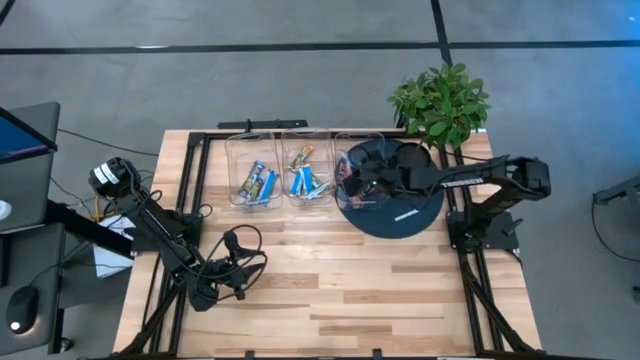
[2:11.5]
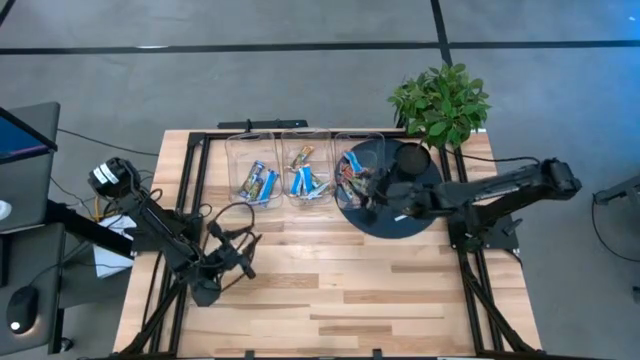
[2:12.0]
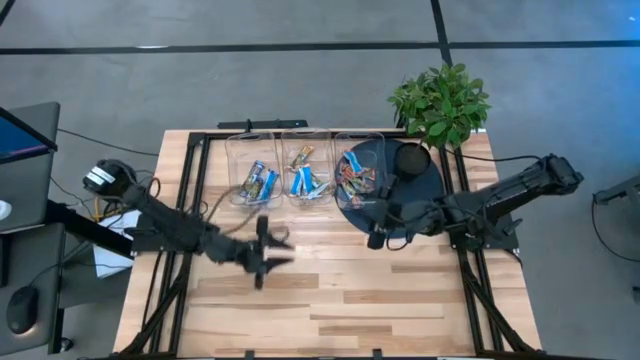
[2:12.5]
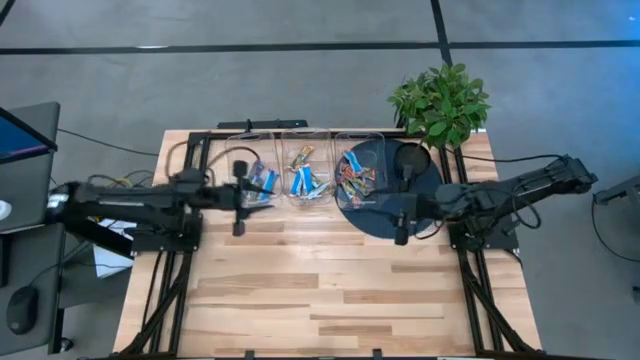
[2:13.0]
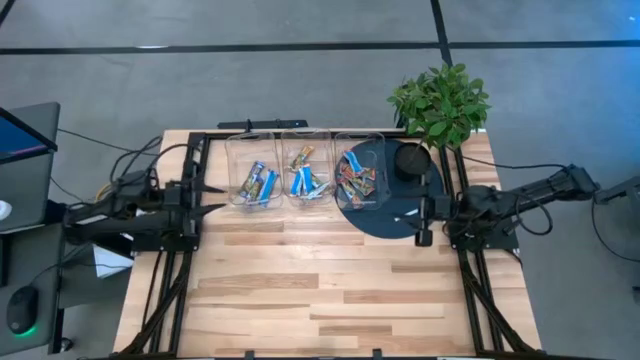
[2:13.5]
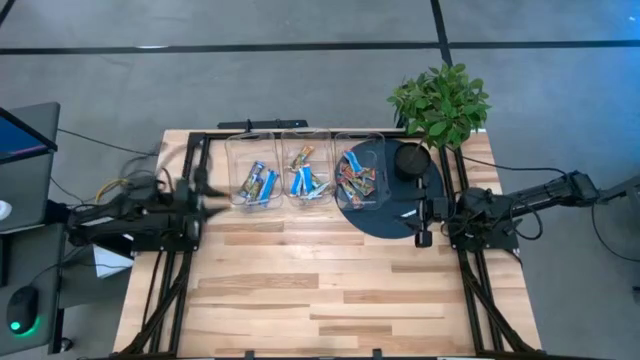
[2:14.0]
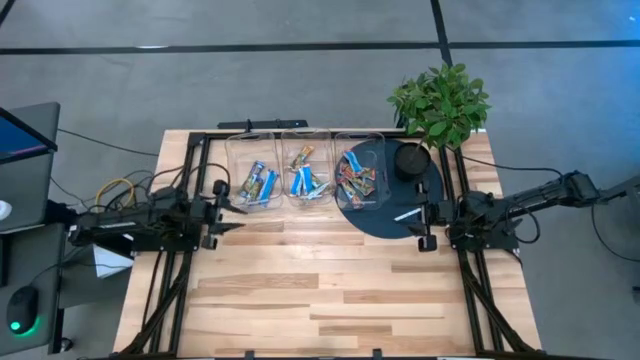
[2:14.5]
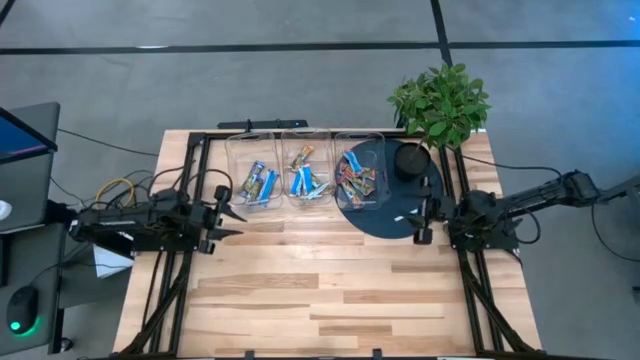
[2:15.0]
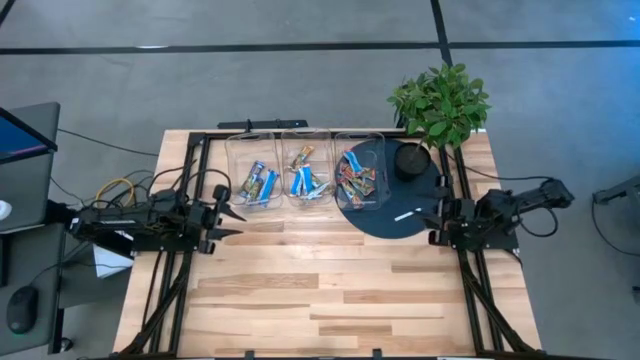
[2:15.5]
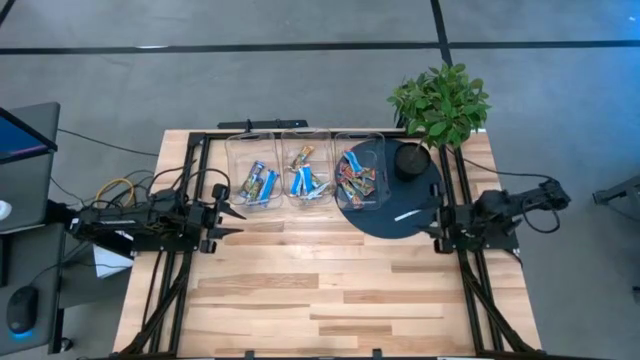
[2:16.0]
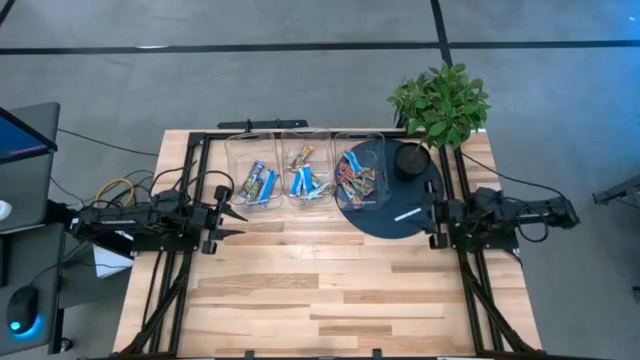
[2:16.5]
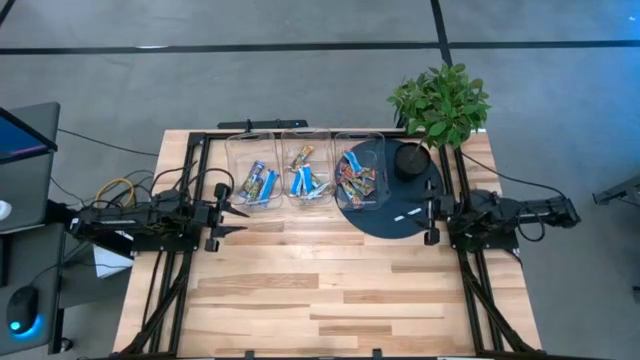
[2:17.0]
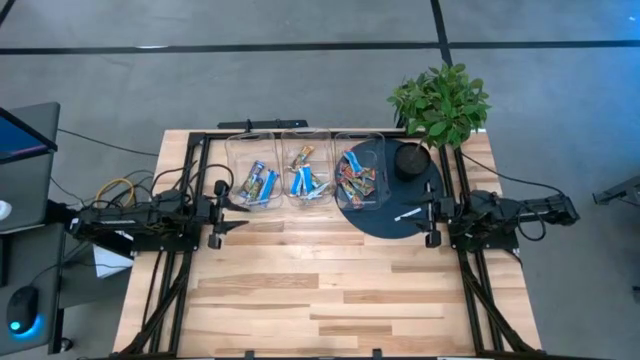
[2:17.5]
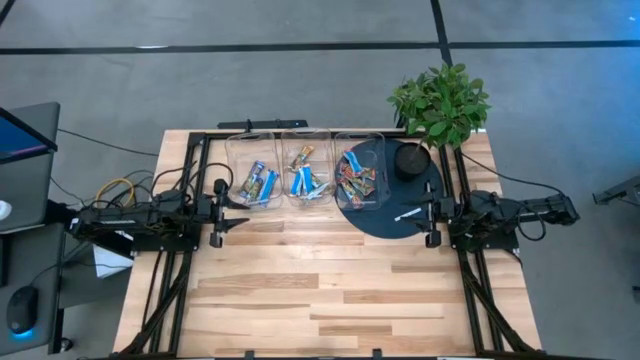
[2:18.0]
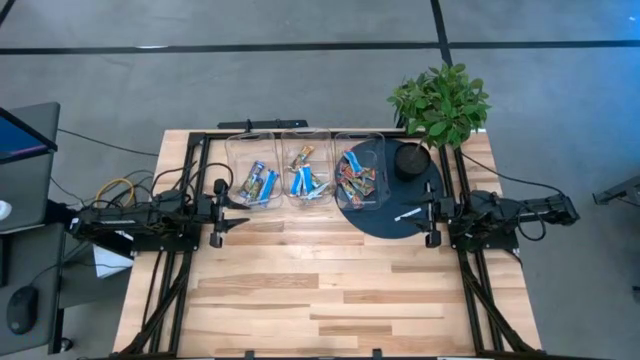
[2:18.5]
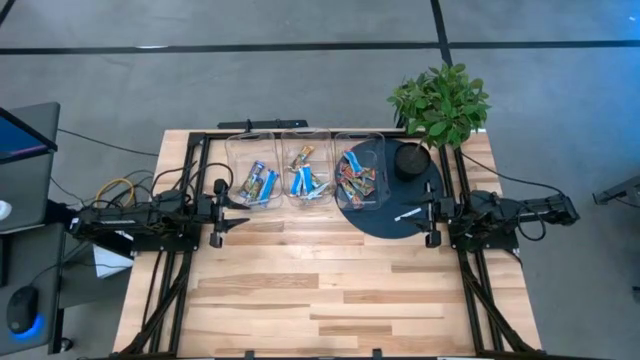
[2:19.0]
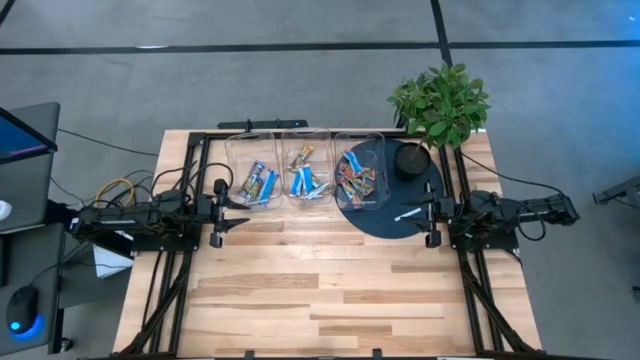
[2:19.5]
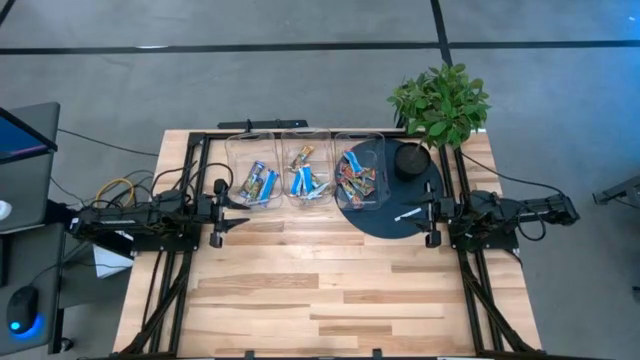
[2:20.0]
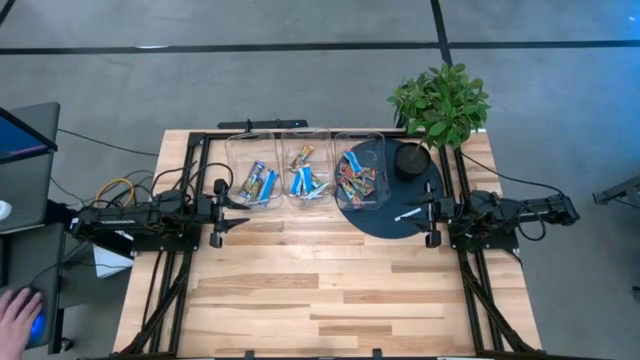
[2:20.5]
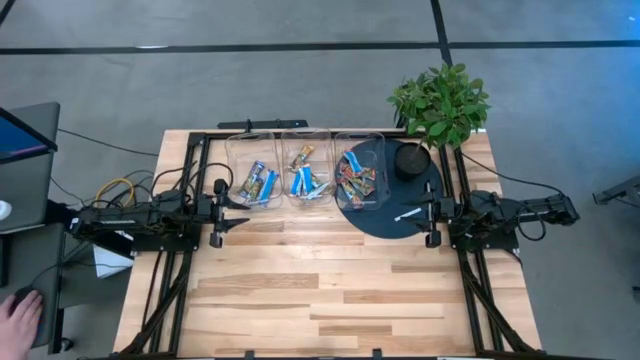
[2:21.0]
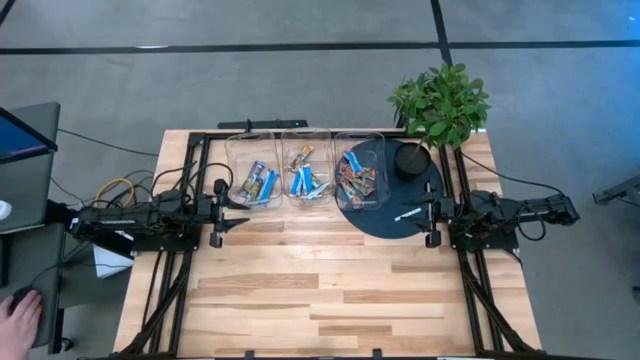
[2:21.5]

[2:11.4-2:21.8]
Task: Pick and place Granola Bars by type
Return to Home Position

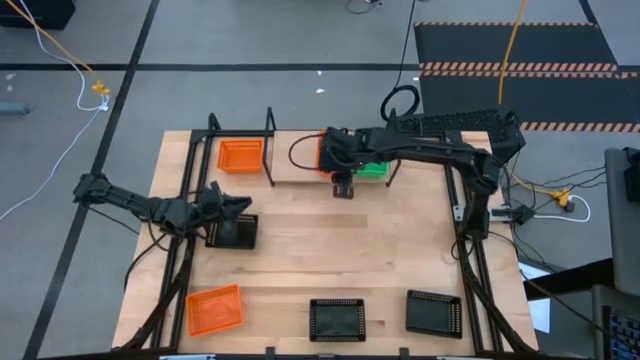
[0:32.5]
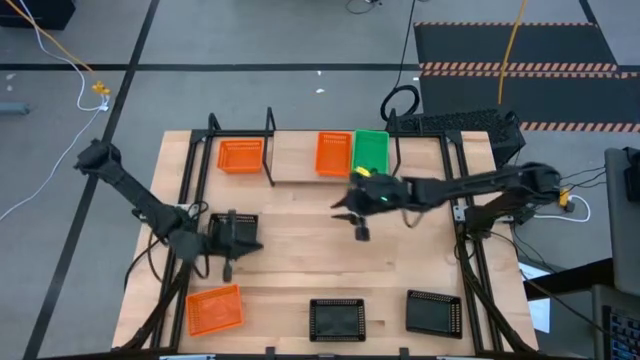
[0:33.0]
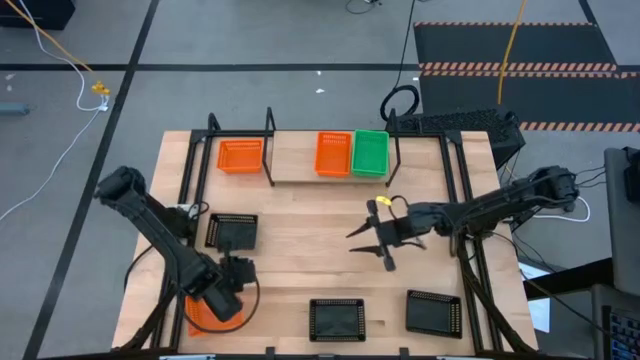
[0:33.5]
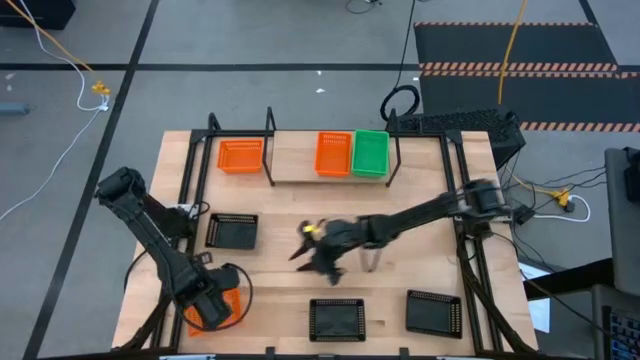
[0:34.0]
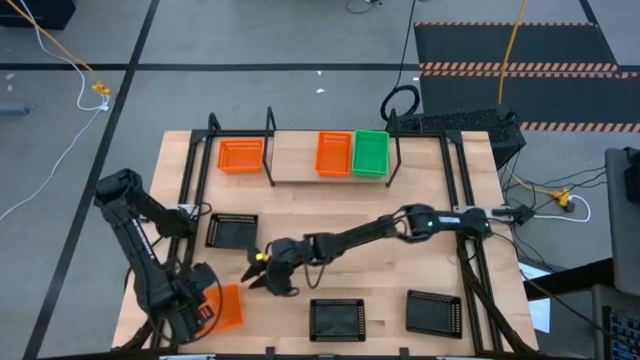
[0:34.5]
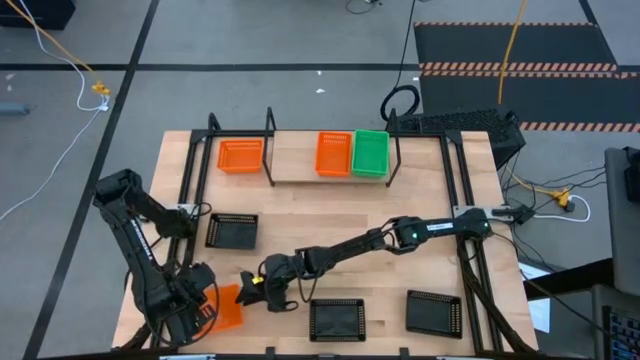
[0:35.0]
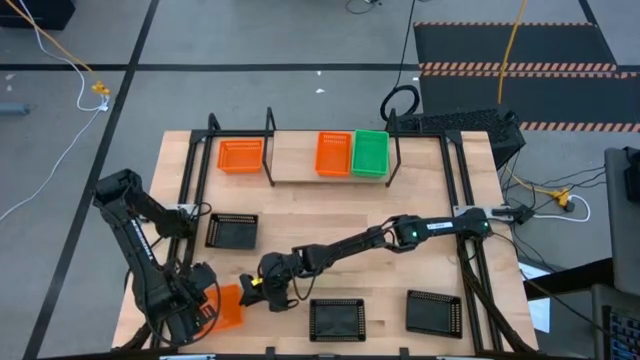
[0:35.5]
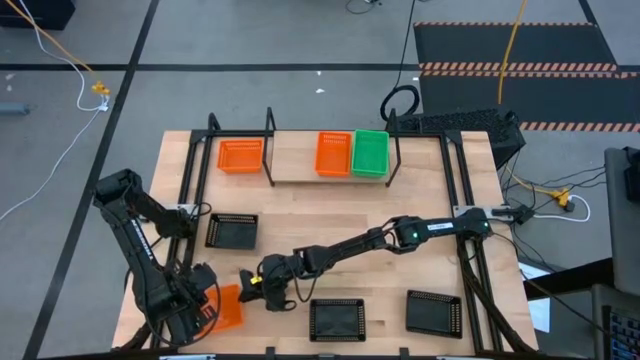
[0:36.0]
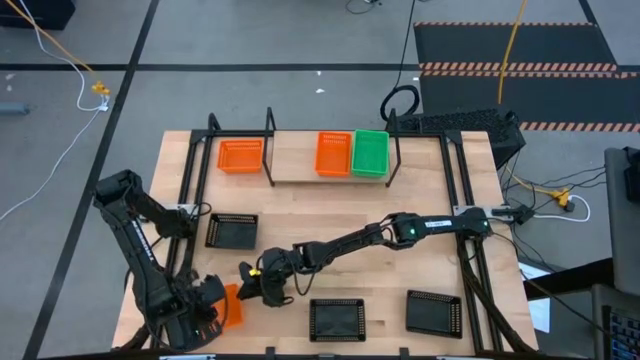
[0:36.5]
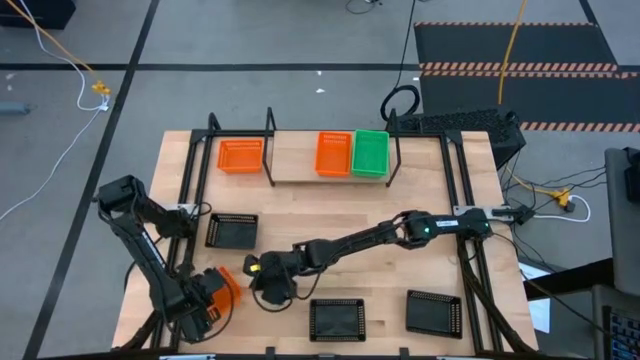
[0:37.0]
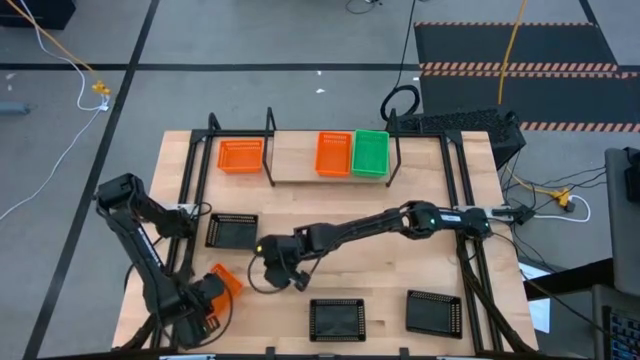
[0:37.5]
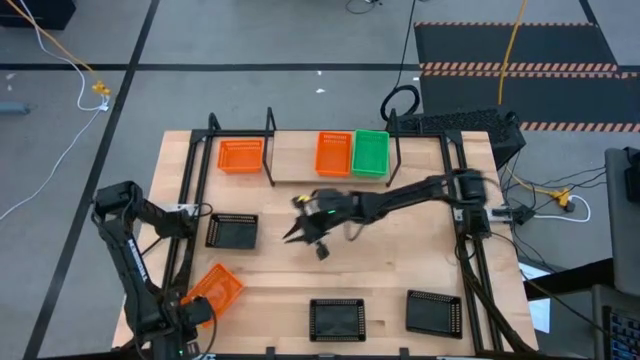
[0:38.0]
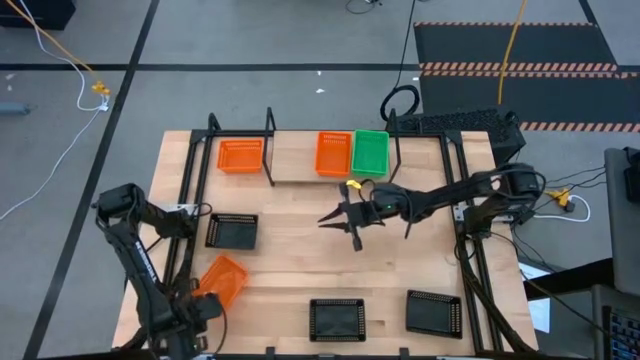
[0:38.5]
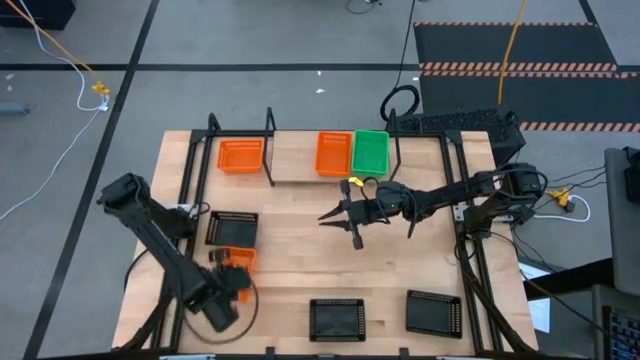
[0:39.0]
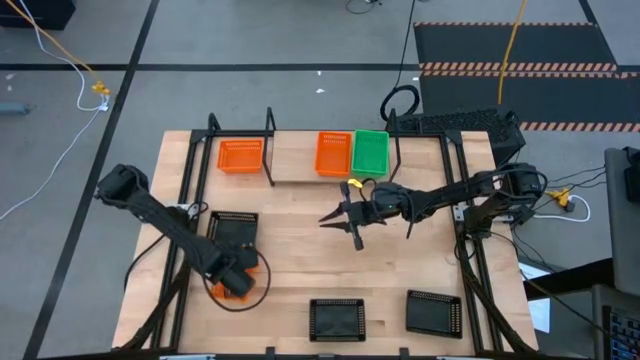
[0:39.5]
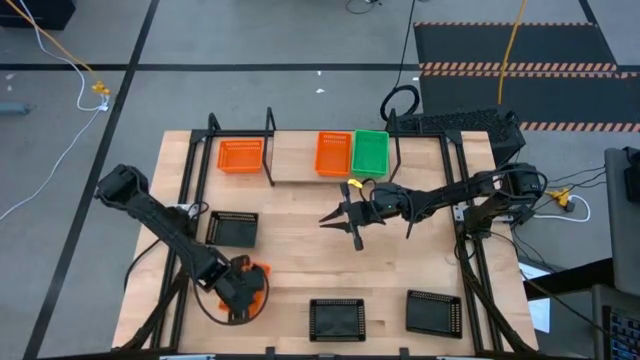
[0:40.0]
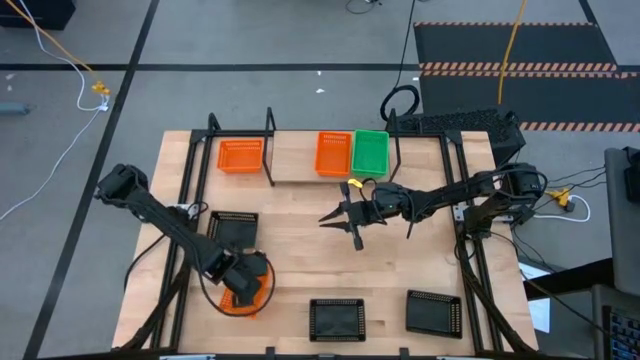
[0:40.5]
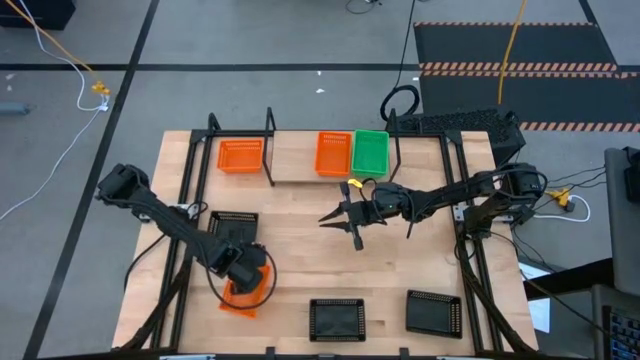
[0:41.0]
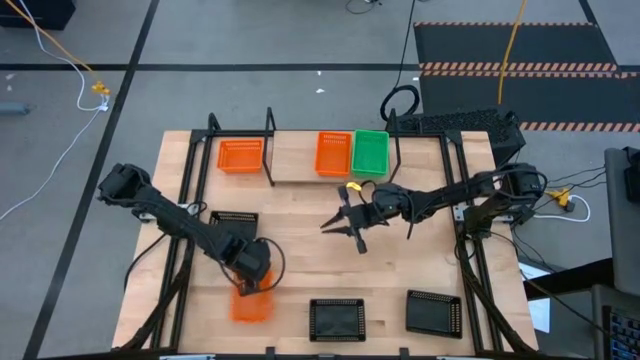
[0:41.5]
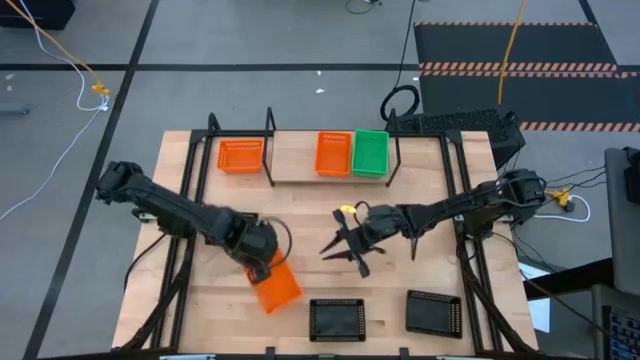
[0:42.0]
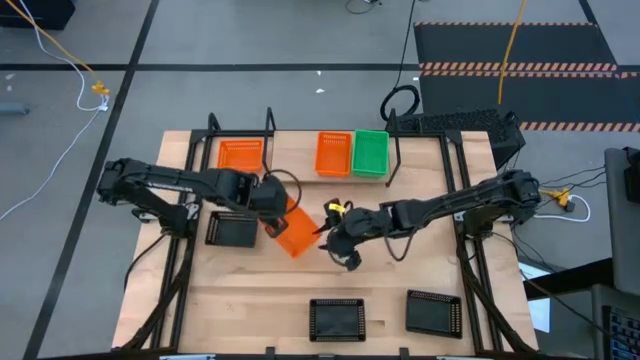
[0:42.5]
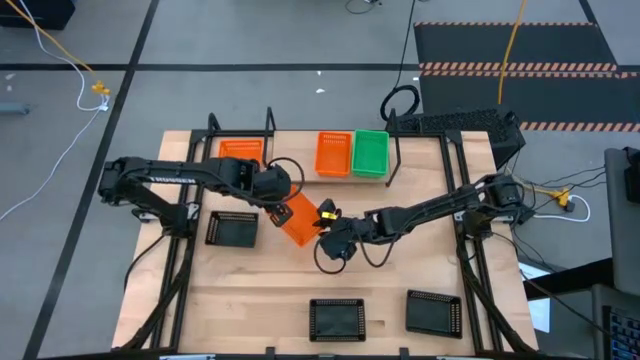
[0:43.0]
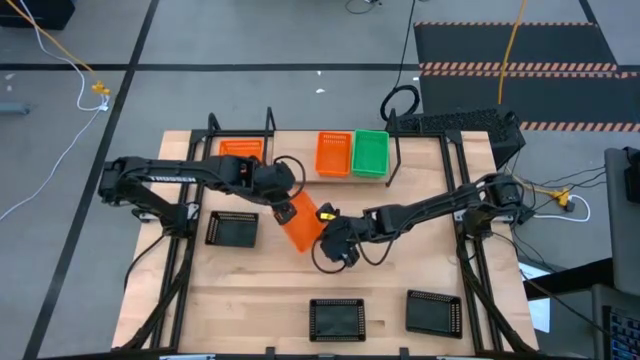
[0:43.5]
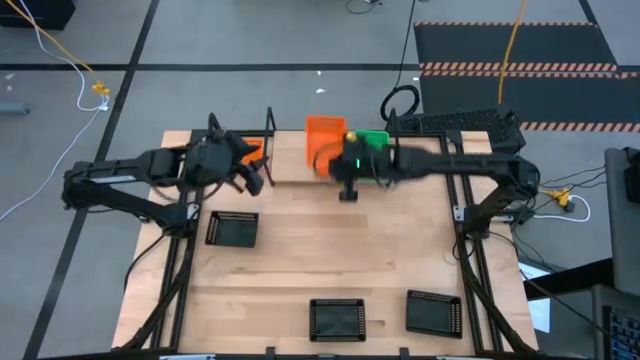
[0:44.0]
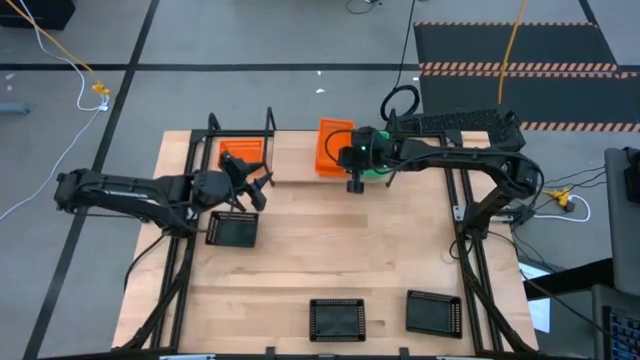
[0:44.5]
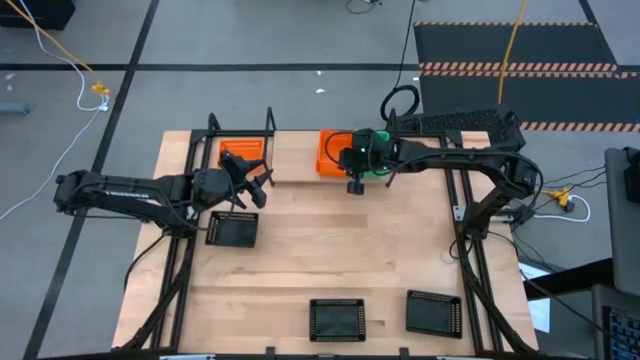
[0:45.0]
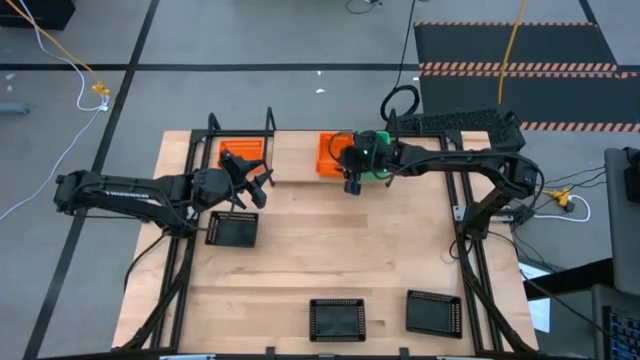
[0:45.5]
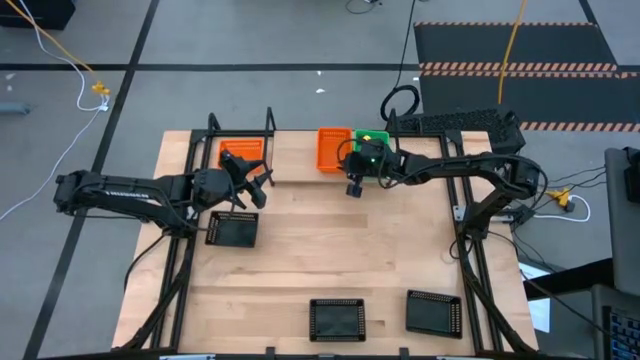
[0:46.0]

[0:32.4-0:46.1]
Task: Stack baskets on shelf by color
Stack the bottom orange bin on top of the orange bin on the shelf
